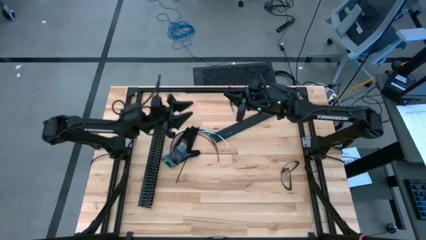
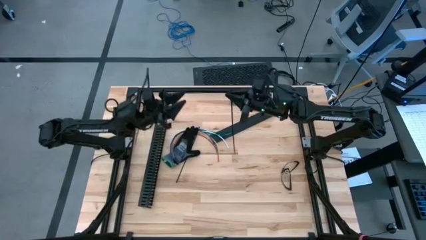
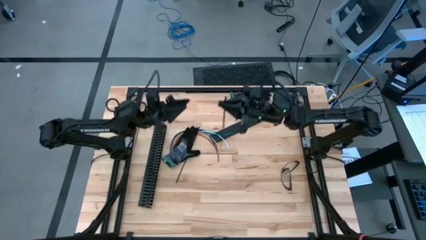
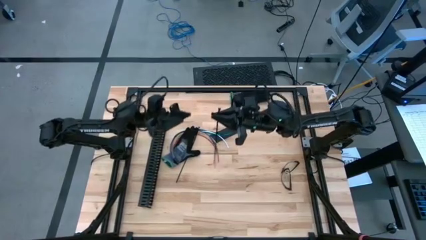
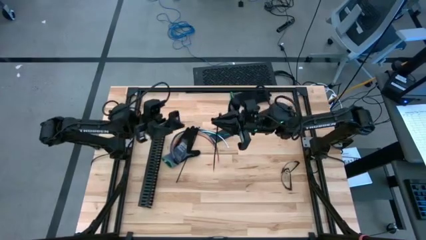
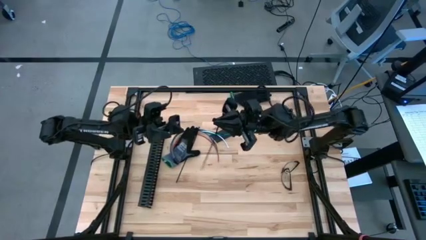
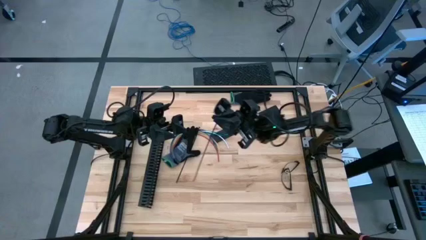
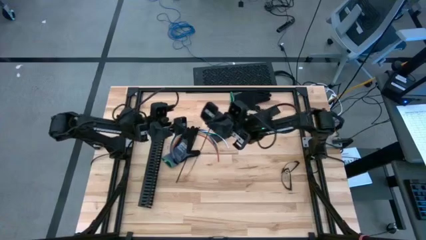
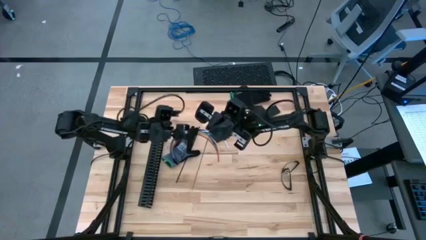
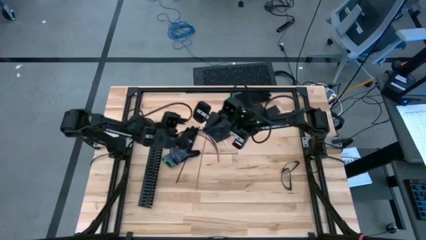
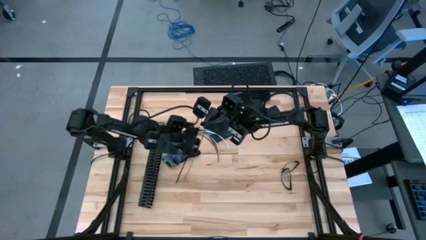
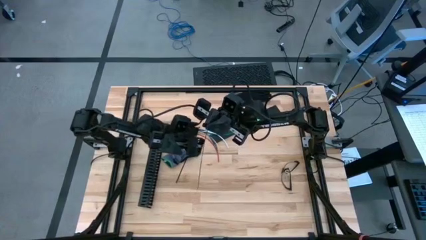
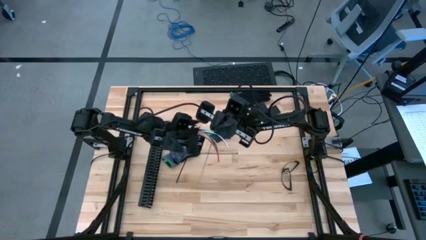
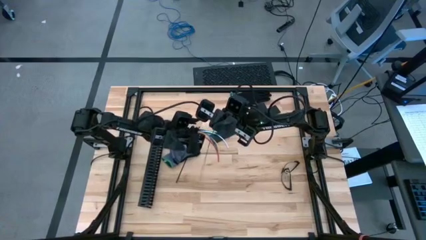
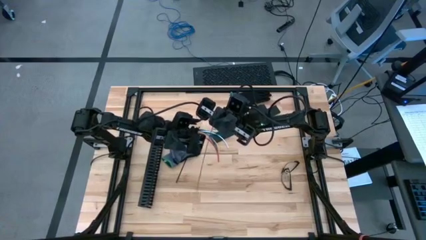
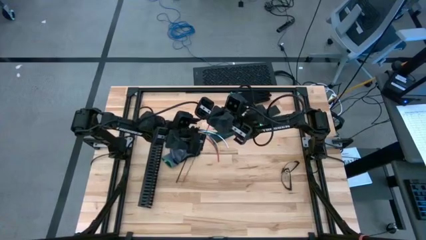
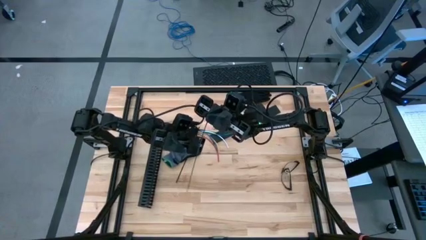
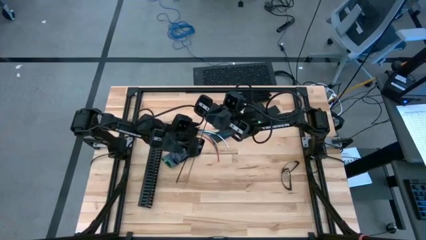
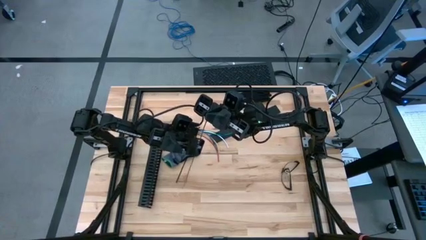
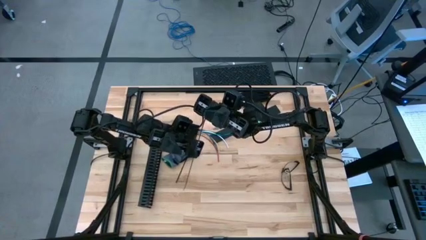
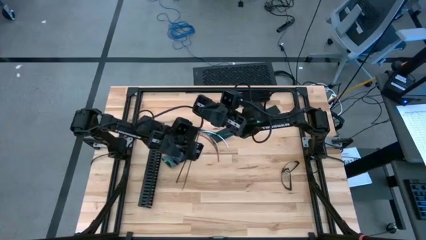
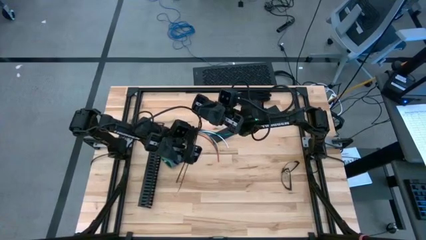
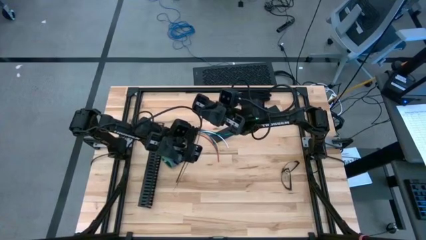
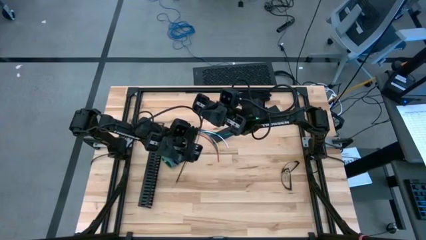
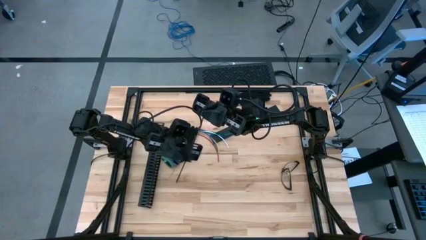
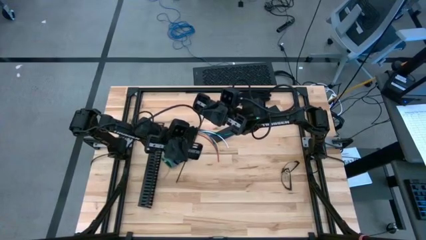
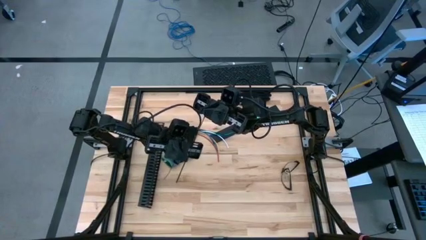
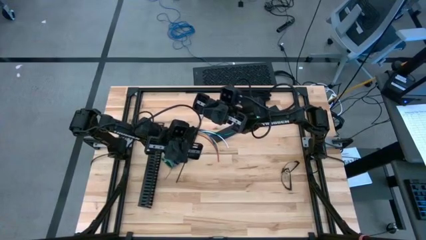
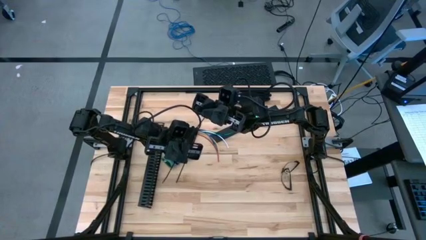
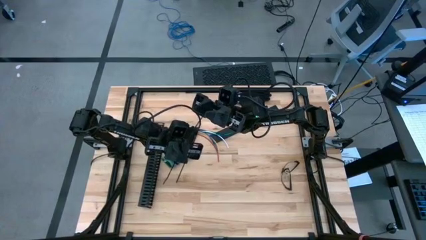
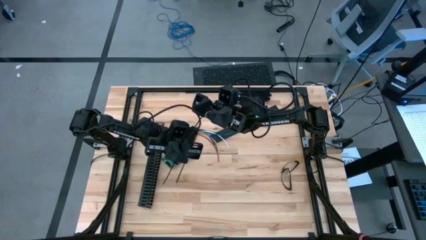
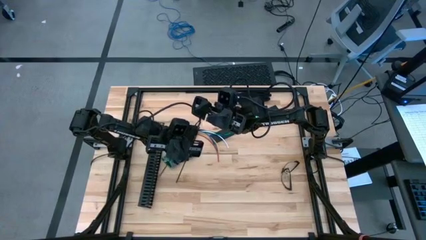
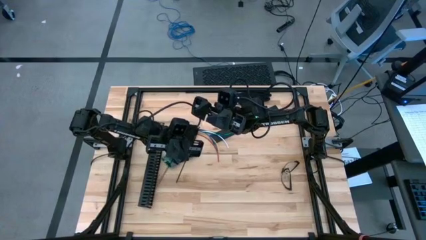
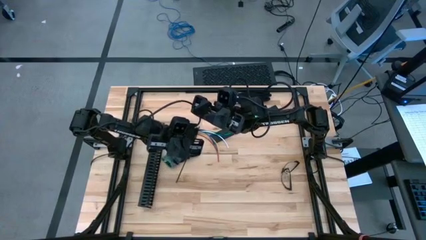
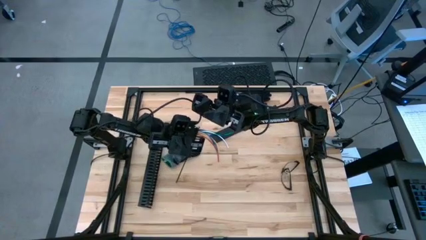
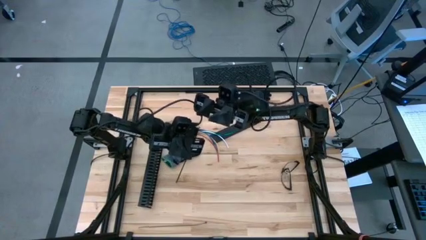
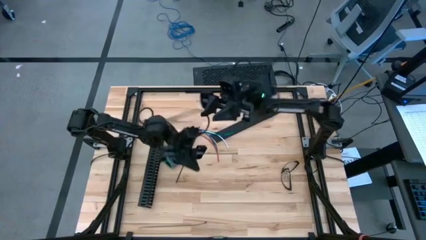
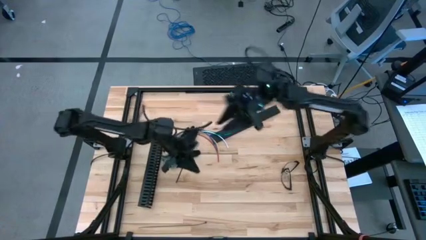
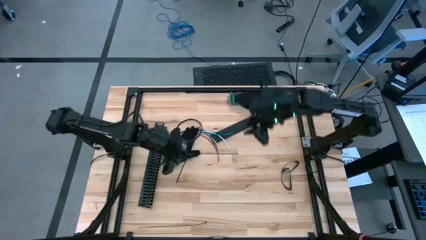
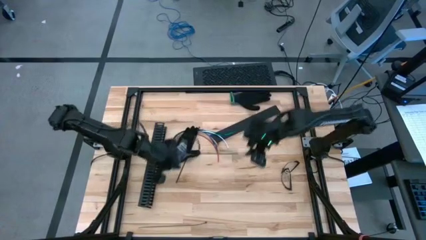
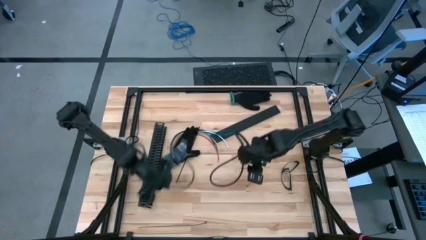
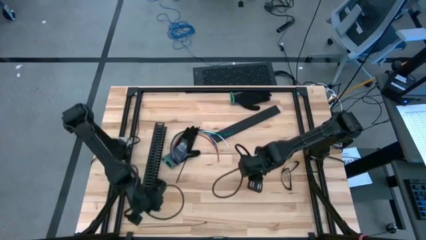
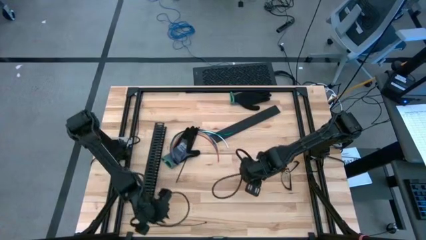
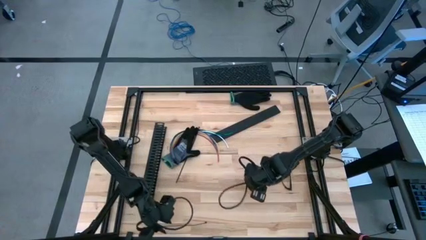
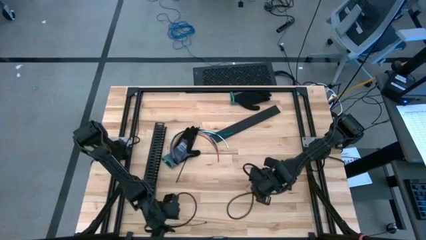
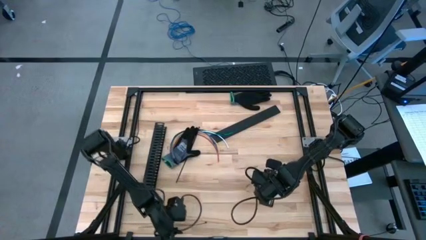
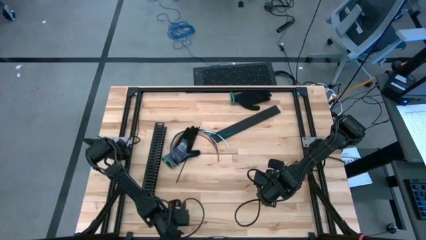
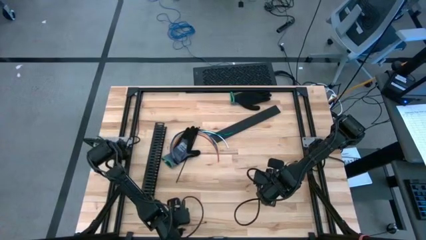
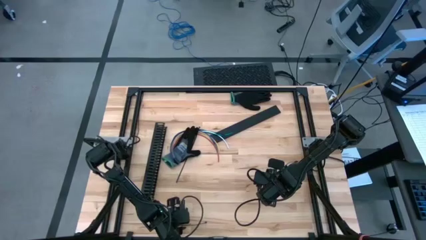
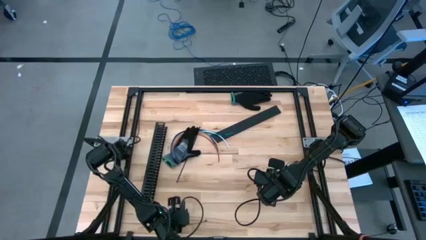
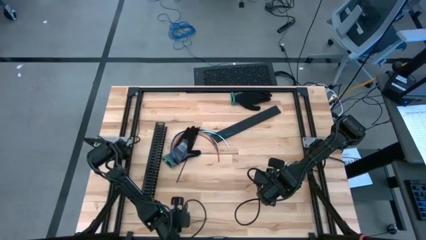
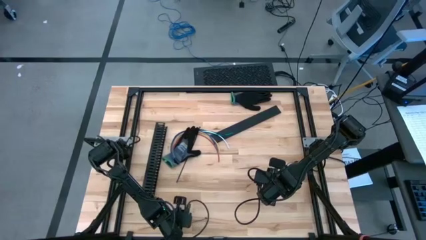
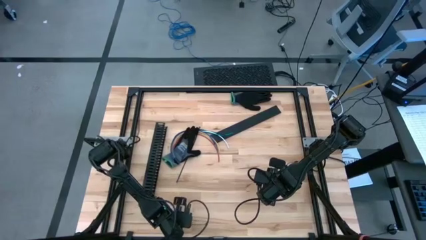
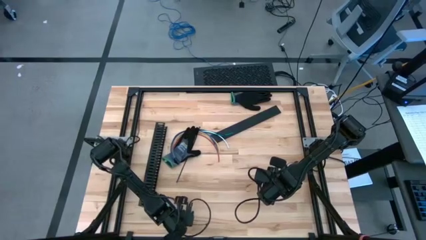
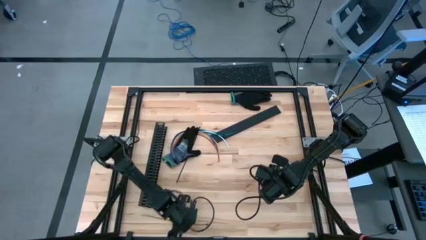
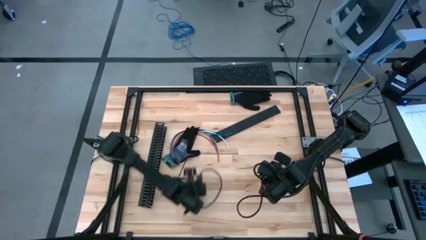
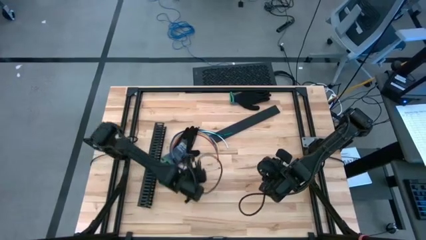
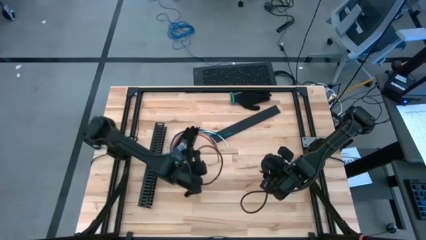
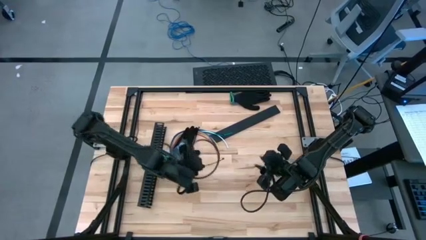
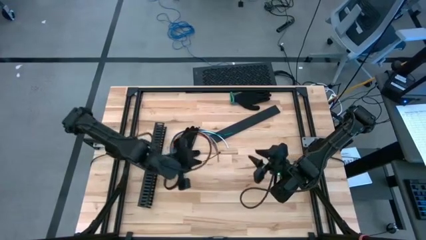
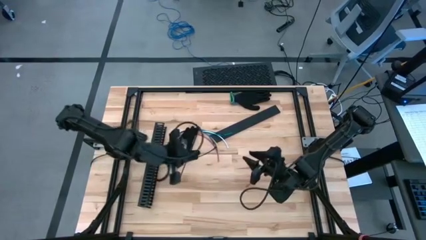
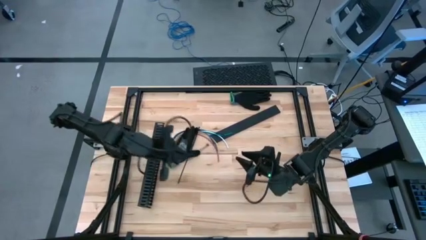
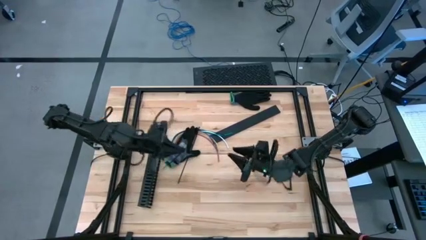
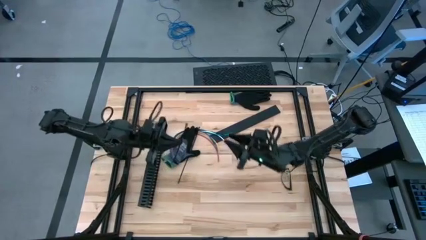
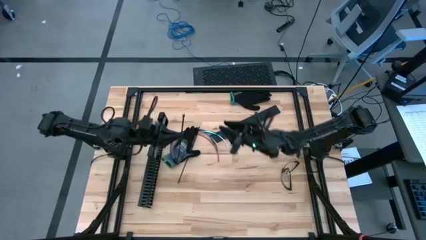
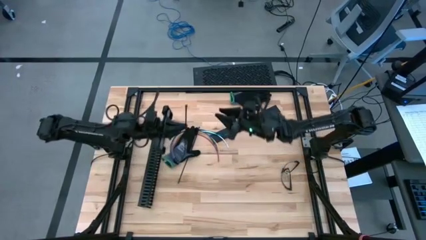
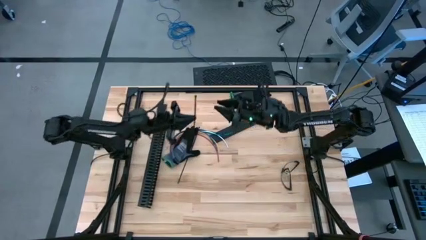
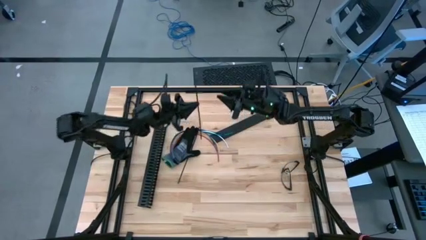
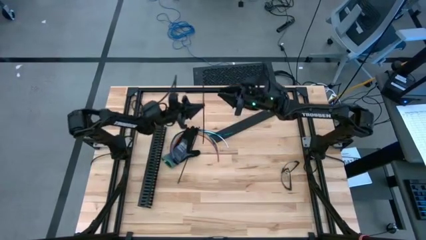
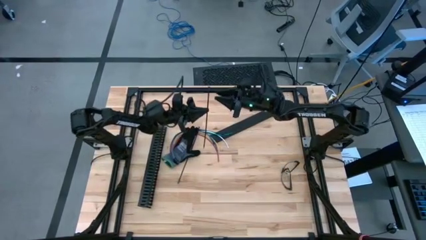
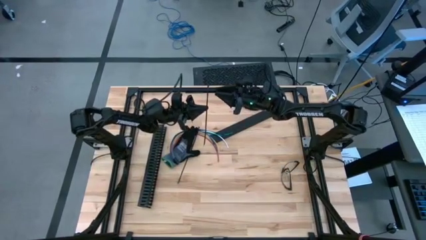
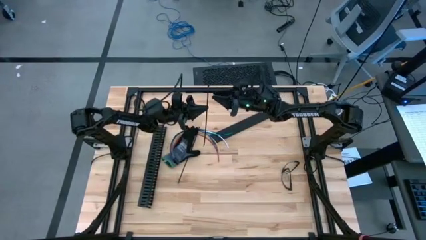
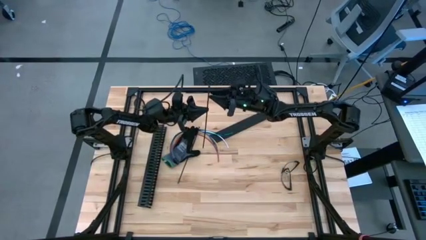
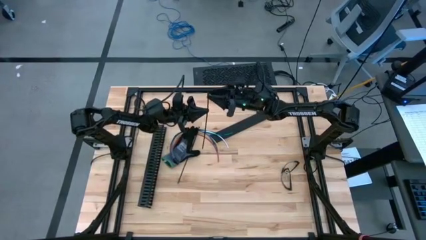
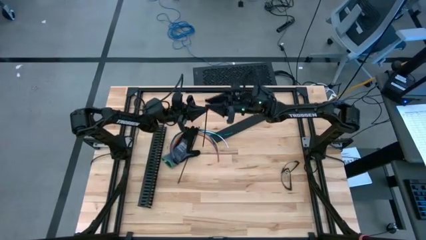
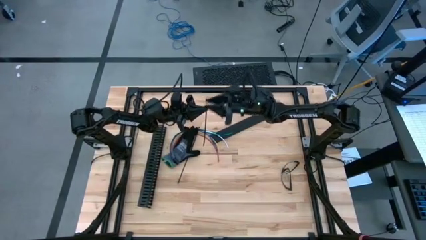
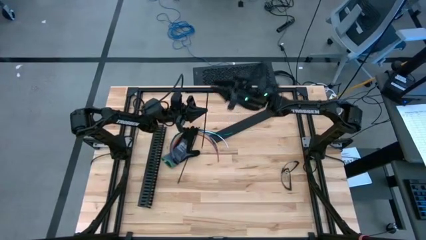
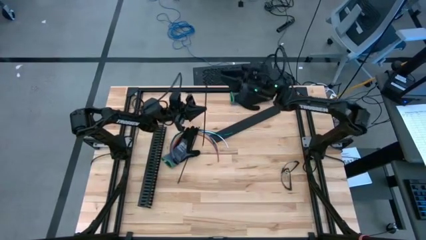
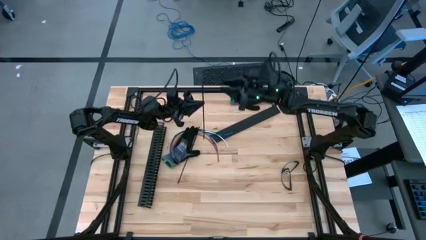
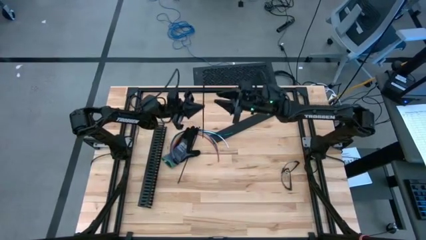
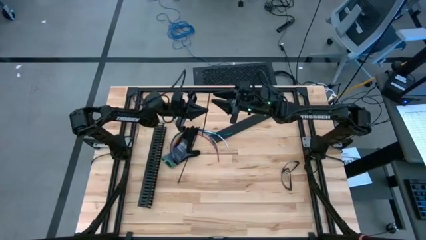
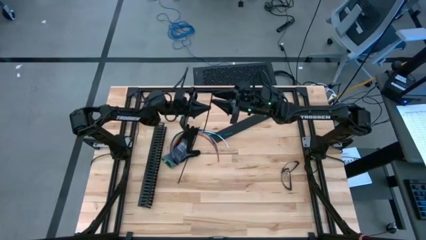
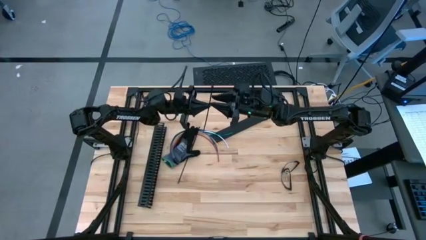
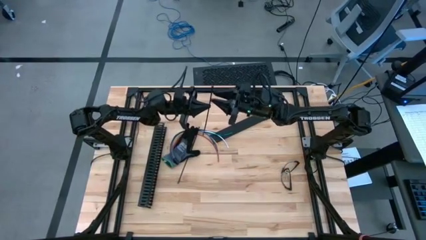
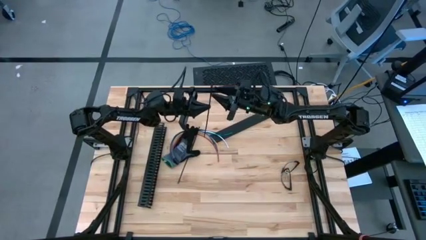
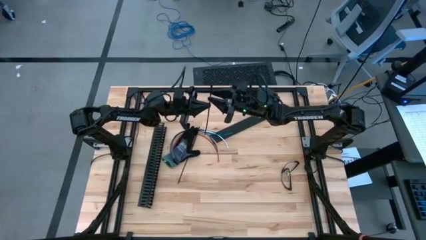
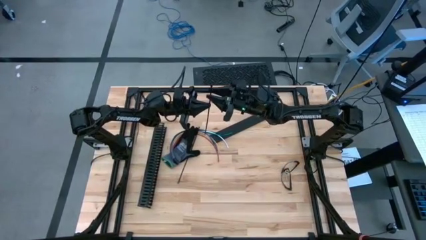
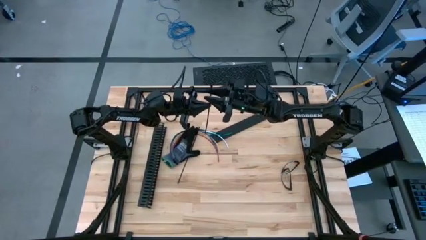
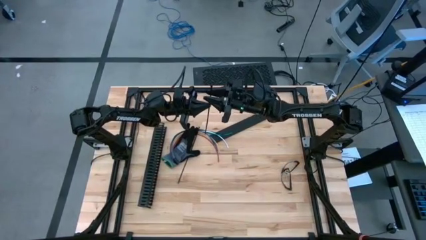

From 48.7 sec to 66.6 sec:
Task: Ziptie cables
Wrap the cable wires with the black zip tie
